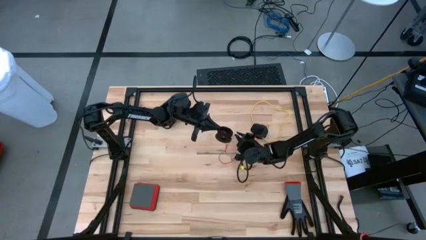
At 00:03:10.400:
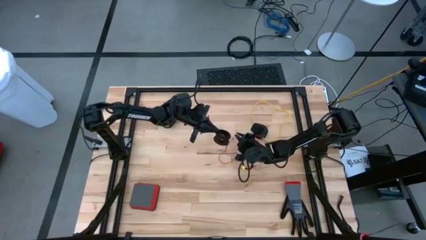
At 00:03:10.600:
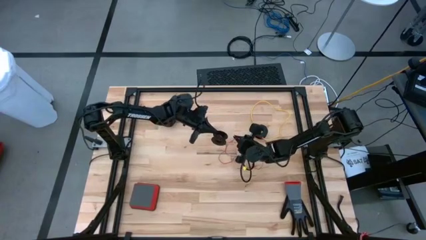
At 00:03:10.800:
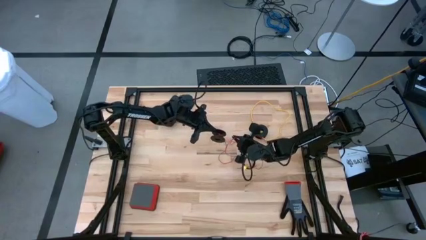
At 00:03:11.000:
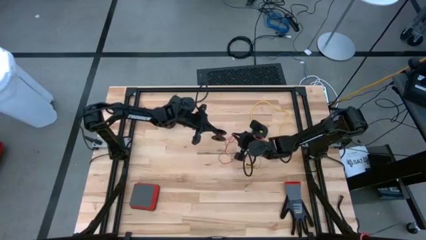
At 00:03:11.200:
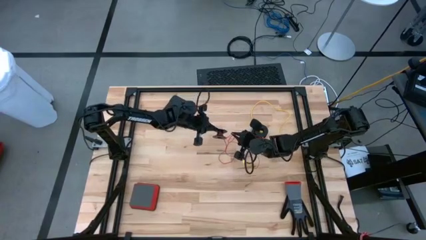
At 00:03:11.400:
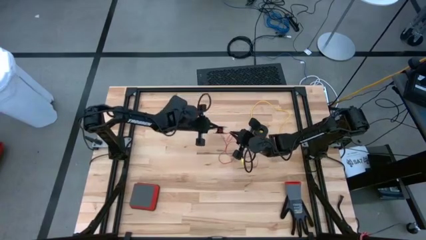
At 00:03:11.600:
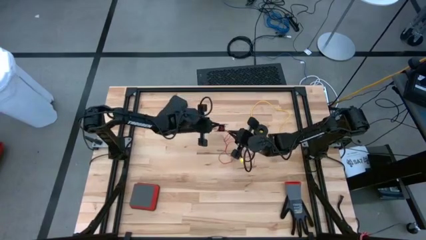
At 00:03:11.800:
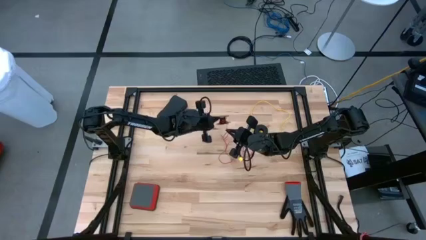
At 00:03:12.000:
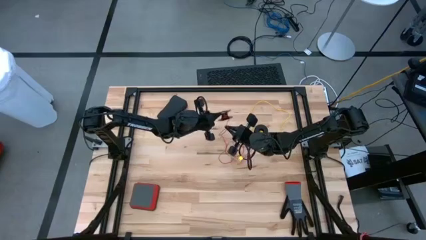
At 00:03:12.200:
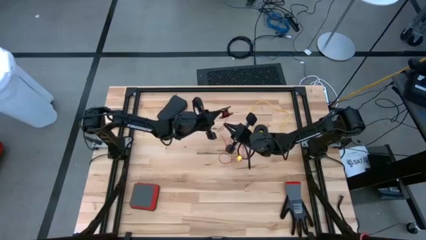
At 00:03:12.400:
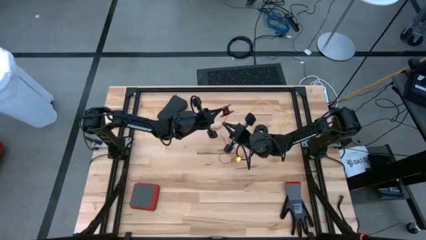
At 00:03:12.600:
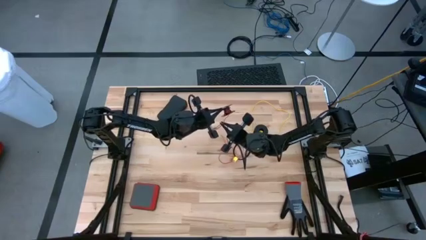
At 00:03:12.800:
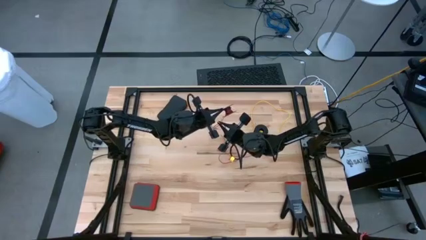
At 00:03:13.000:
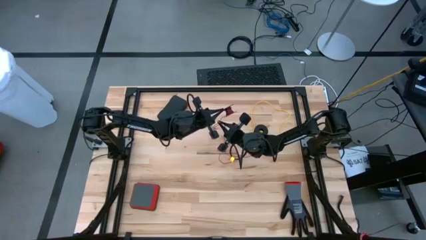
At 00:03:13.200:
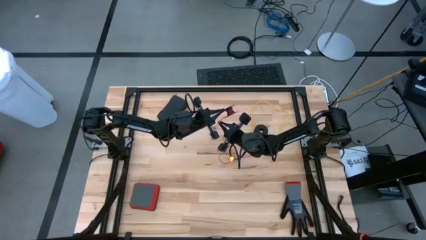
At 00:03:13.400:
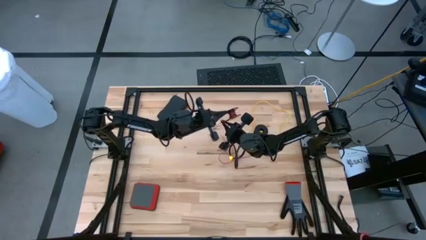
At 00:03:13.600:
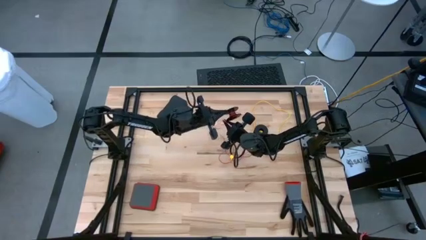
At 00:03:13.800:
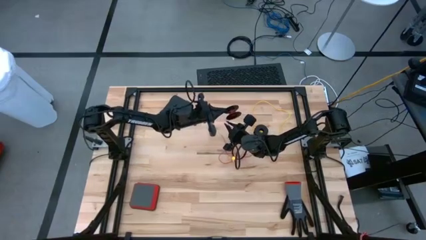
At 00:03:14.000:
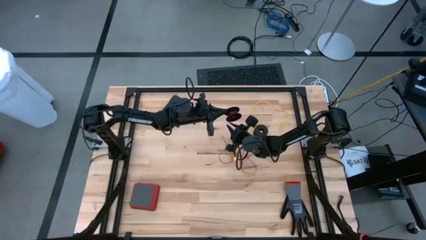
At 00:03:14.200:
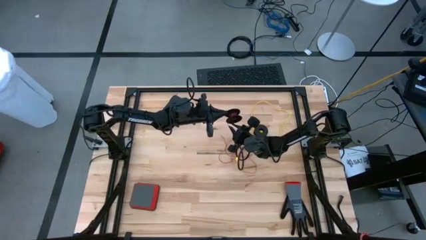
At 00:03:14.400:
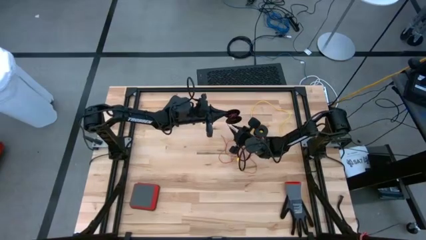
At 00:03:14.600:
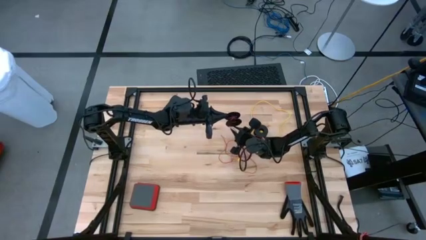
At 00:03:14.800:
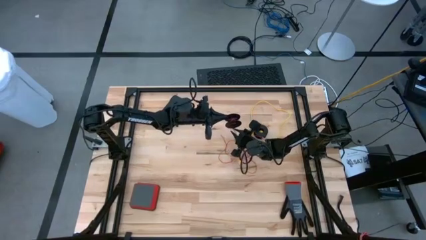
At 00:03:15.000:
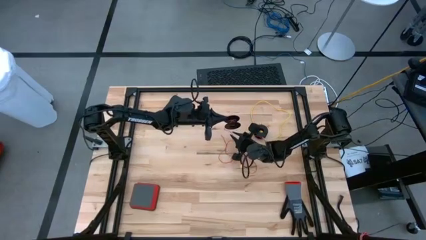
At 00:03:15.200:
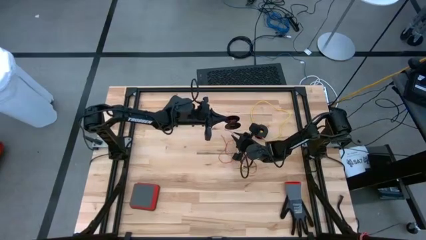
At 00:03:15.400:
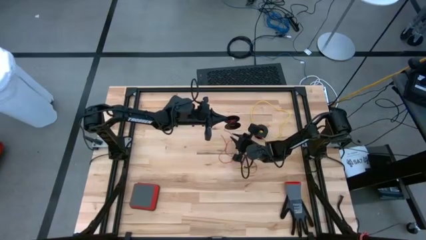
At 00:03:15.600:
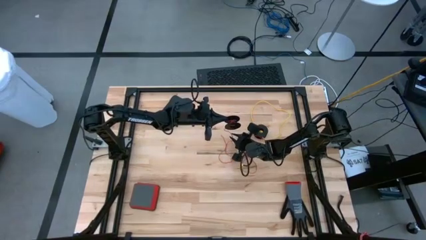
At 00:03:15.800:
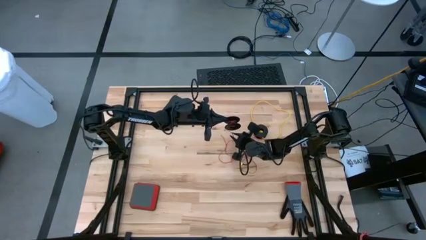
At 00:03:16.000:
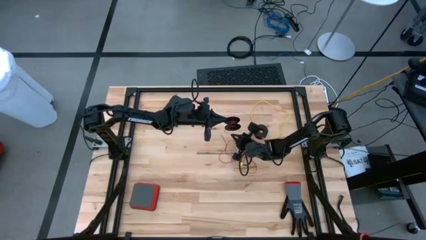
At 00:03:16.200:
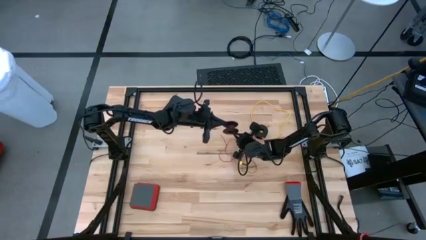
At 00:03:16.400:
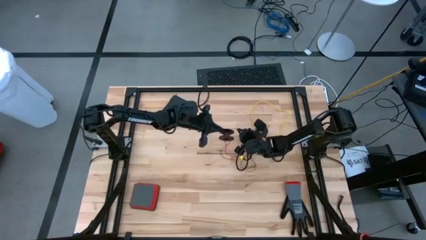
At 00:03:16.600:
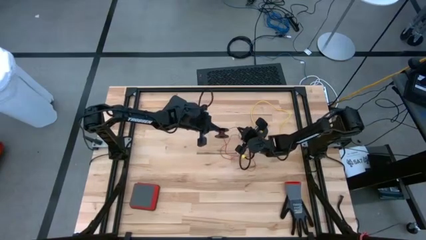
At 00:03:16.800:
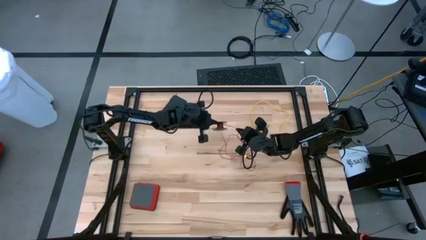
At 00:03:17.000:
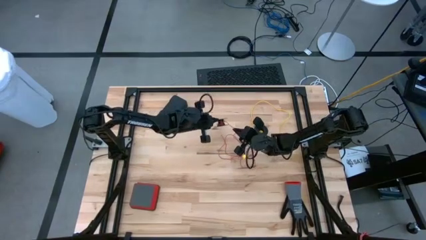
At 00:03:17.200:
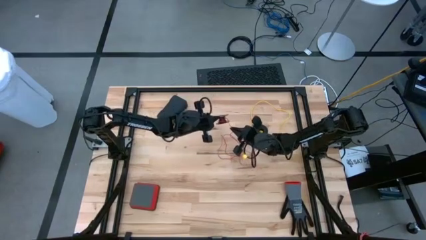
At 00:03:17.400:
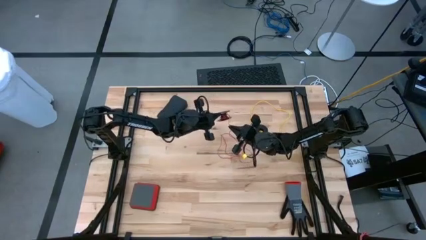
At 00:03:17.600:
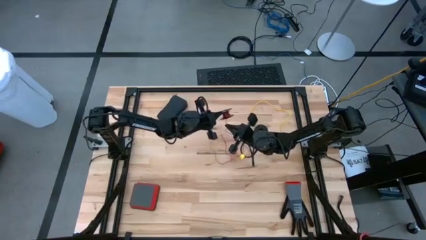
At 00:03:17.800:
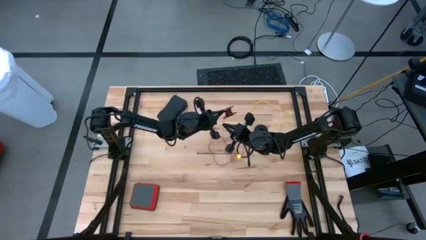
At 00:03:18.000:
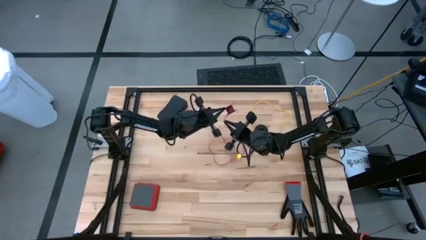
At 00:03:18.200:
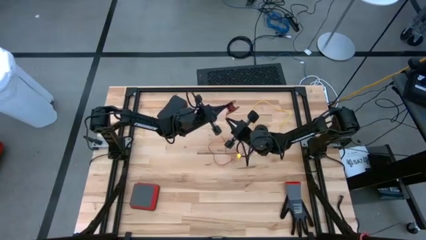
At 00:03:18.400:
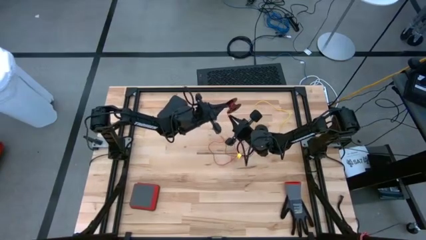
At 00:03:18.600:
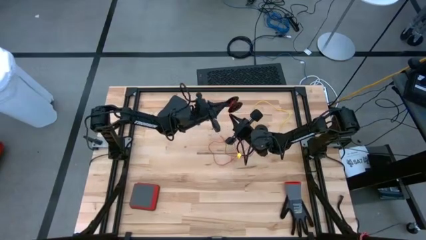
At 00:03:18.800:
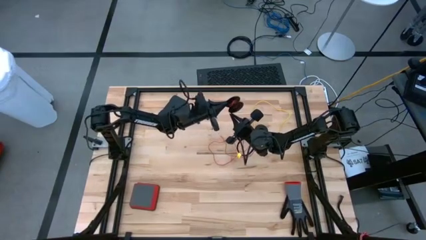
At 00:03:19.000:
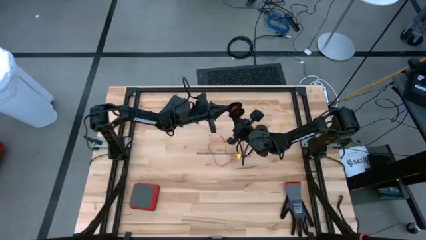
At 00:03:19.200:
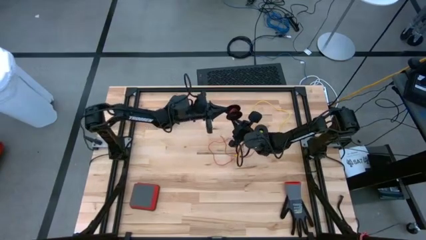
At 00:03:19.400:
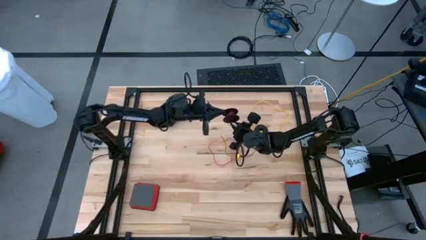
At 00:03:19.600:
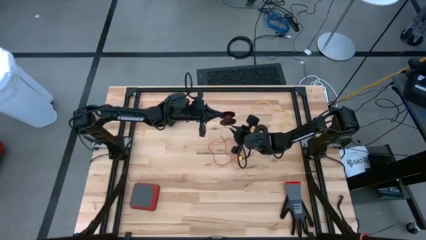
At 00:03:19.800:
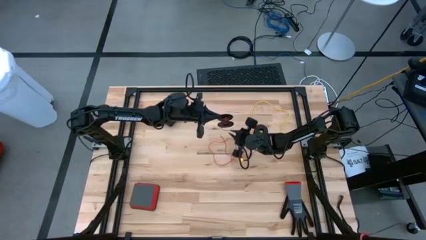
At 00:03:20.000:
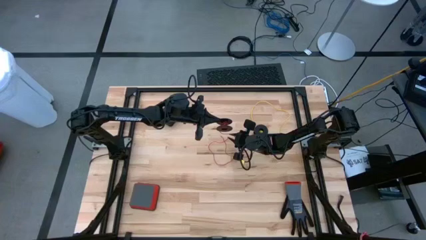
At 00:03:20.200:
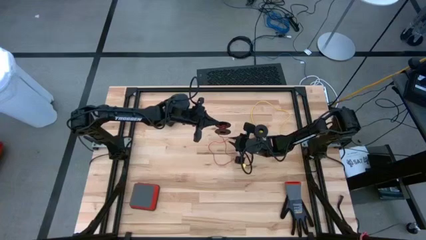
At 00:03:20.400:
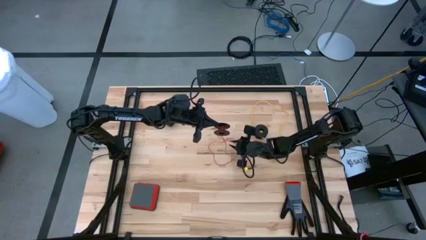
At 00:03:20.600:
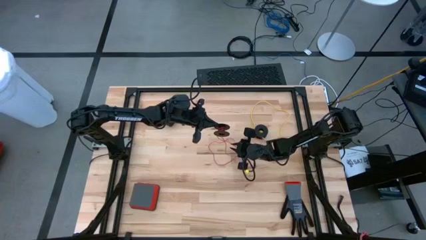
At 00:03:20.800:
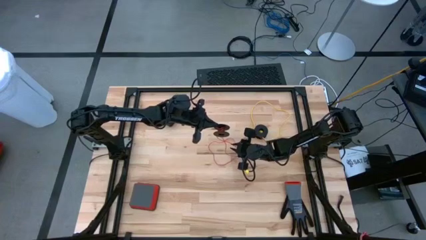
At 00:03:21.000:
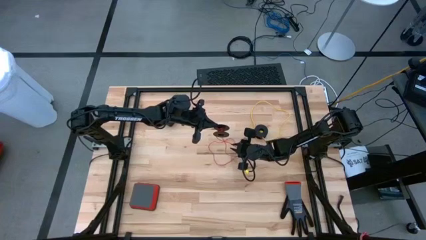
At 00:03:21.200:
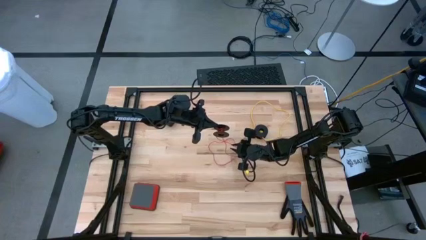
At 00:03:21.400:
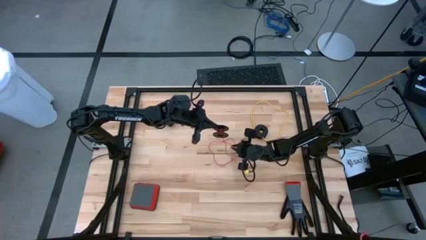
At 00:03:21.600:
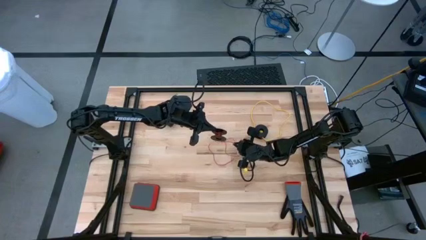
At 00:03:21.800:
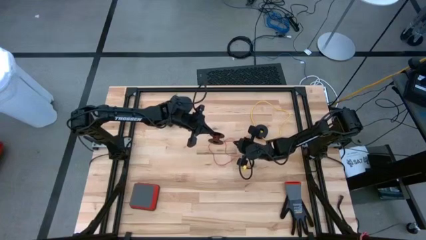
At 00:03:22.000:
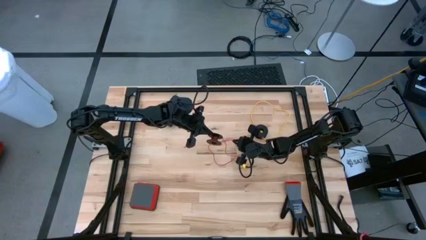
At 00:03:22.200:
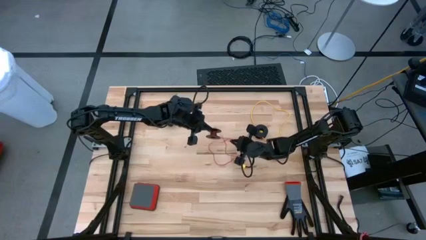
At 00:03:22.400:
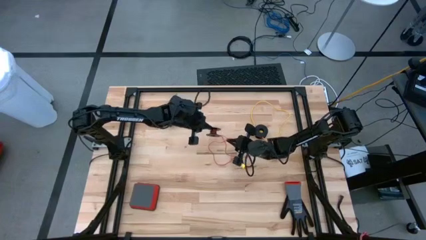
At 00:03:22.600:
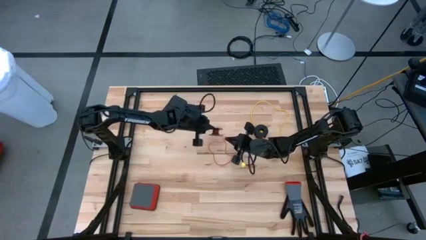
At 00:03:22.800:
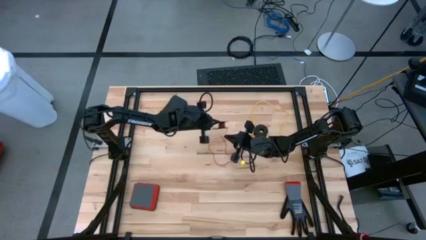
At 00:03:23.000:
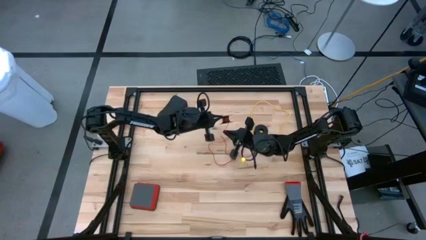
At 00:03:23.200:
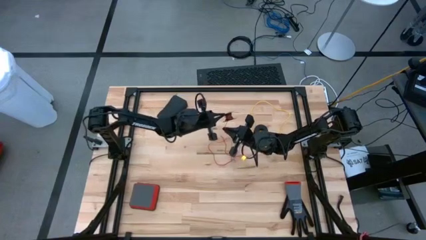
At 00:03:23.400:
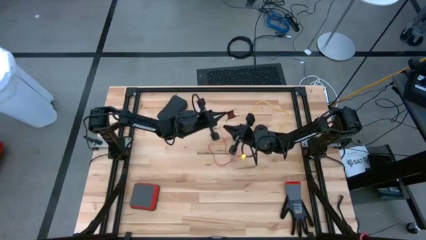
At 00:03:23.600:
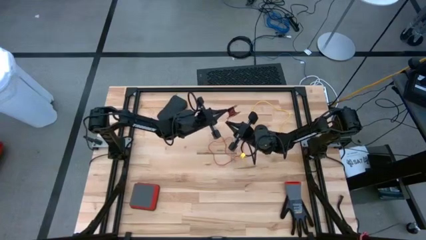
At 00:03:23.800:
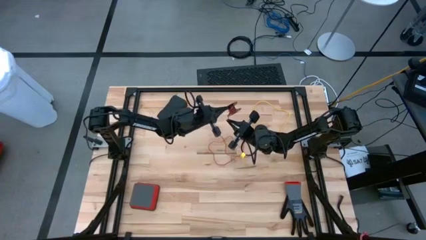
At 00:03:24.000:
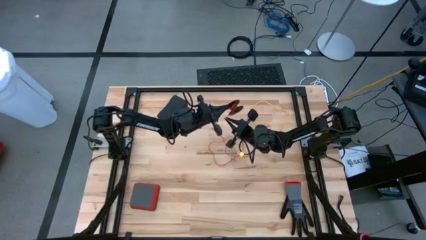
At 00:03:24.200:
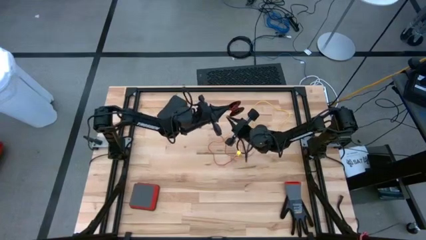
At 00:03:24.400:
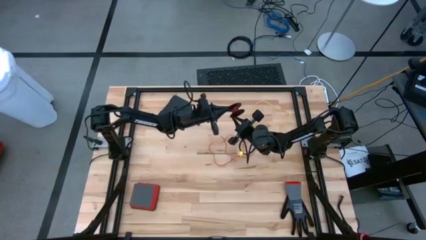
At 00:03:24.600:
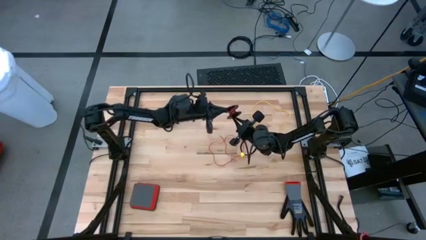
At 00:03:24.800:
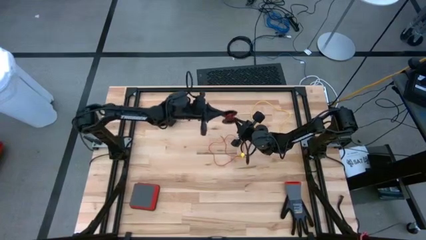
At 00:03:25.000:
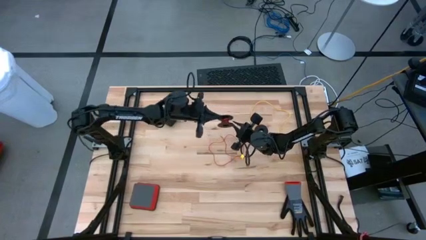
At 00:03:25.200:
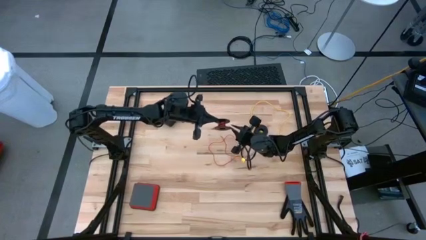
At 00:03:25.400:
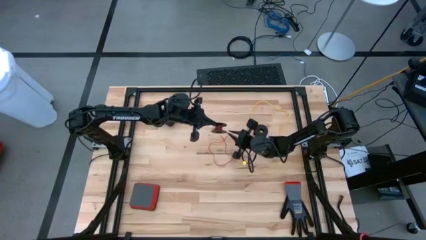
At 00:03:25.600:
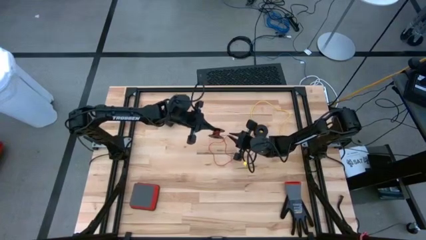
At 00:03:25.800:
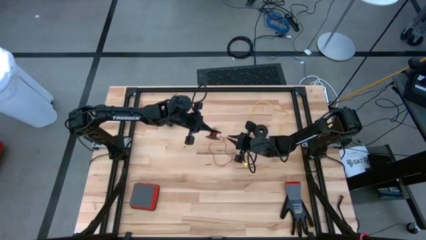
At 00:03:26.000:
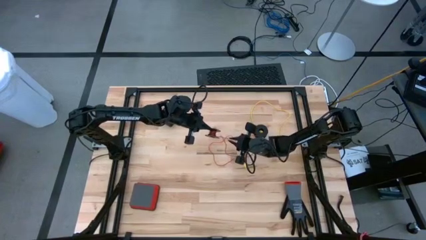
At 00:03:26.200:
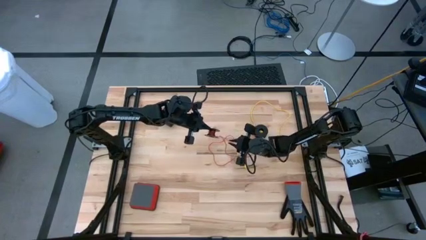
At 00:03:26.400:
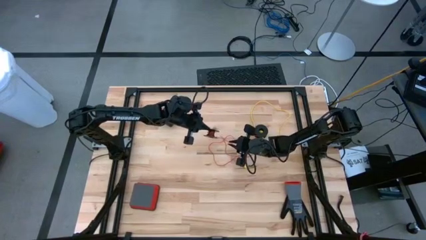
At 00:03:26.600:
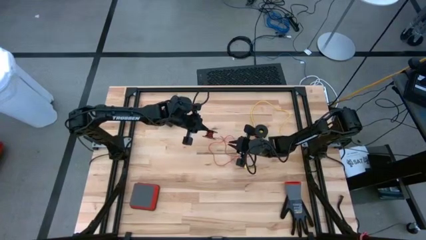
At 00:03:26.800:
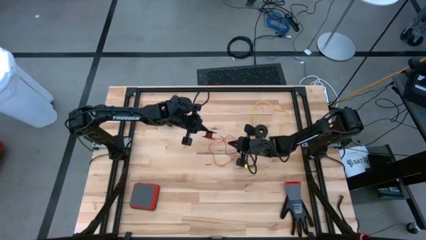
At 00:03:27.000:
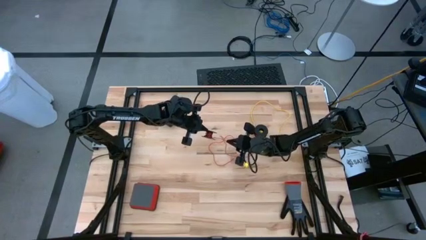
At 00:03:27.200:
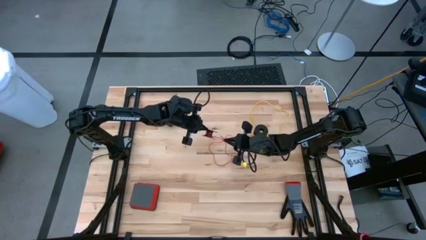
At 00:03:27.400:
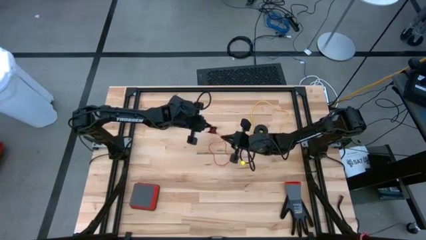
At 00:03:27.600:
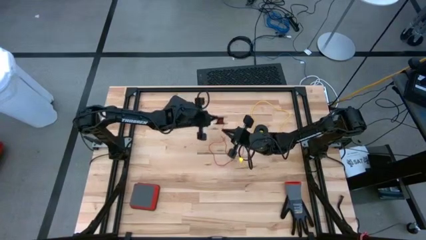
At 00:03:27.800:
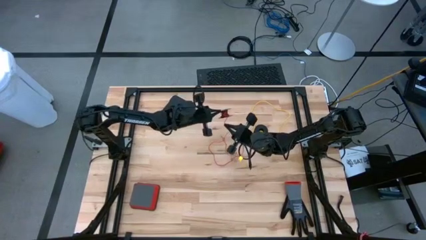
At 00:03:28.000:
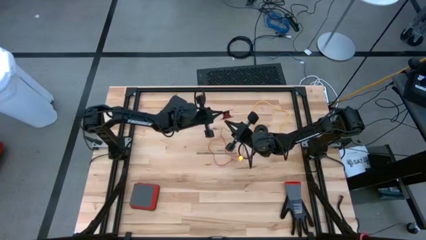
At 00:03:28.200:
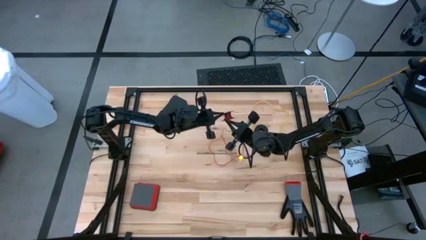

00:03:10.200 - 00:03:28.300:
Task: Coil cords
Coil the red wire onto the black spool
